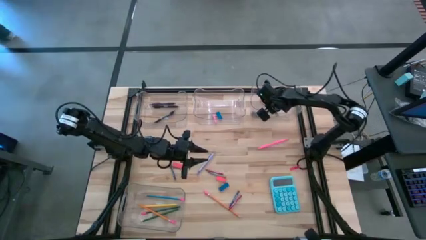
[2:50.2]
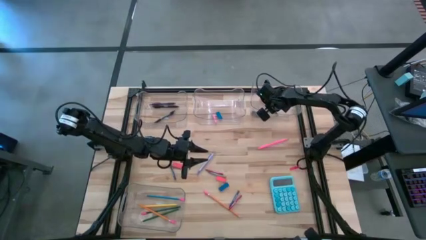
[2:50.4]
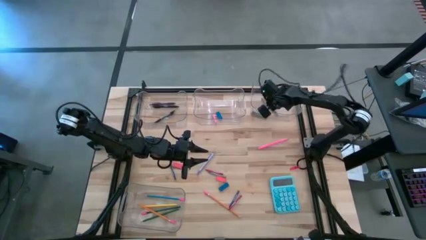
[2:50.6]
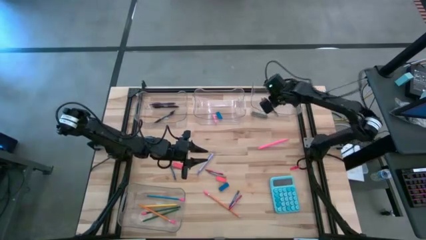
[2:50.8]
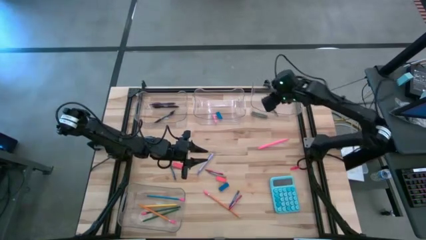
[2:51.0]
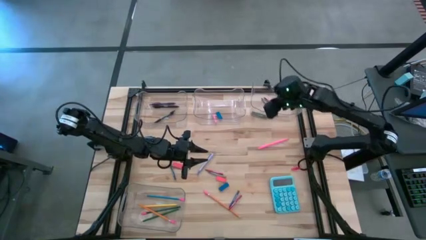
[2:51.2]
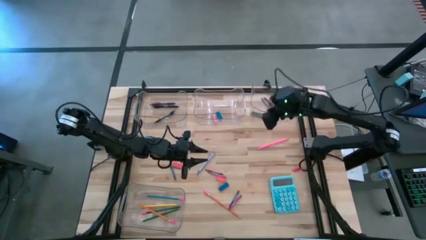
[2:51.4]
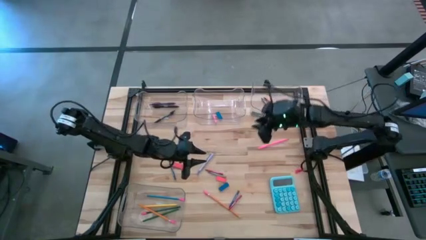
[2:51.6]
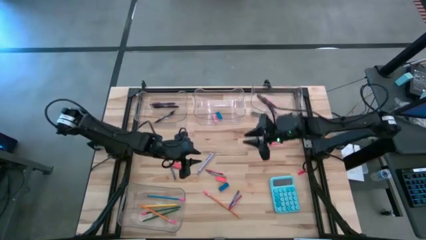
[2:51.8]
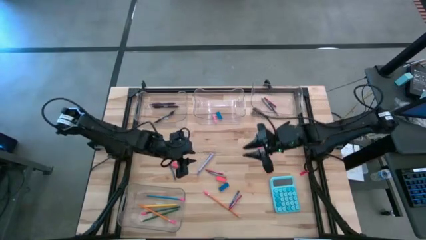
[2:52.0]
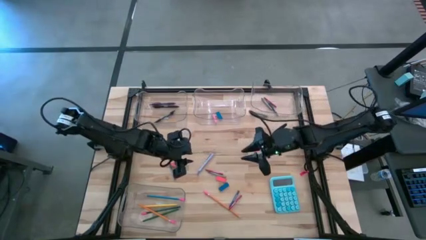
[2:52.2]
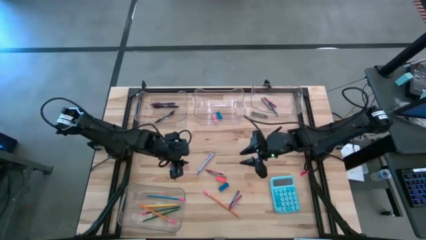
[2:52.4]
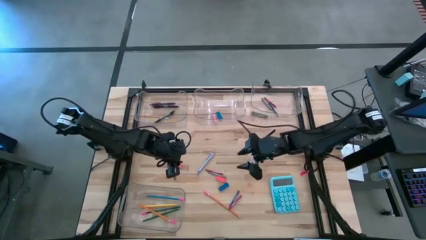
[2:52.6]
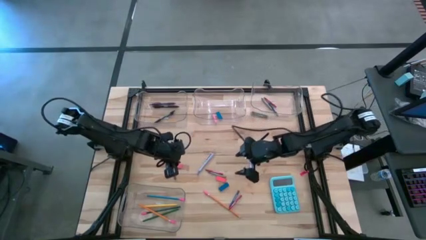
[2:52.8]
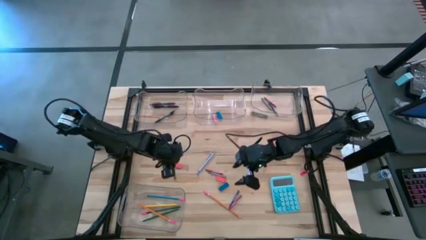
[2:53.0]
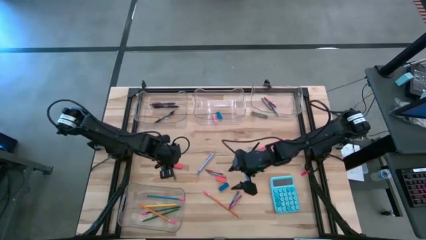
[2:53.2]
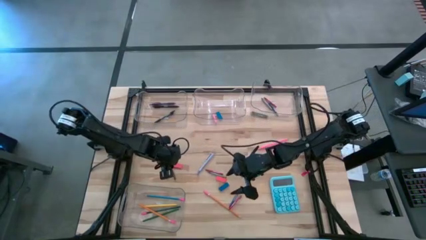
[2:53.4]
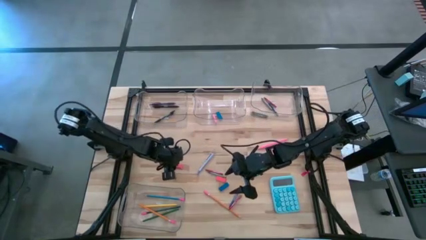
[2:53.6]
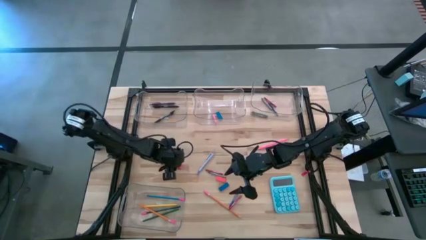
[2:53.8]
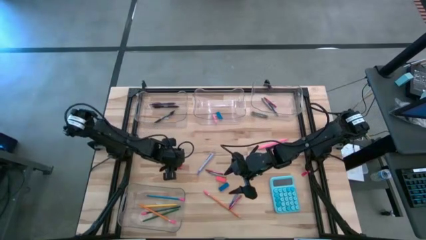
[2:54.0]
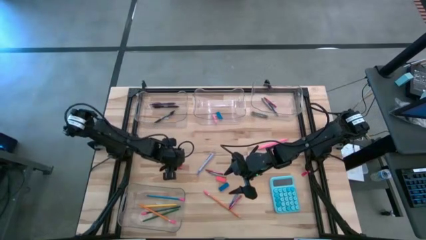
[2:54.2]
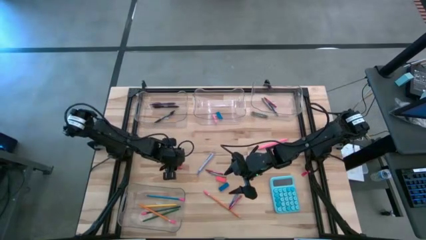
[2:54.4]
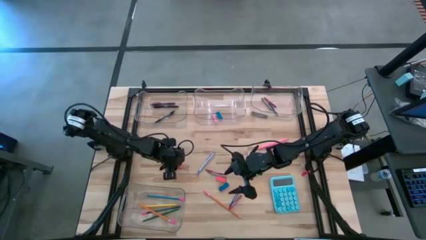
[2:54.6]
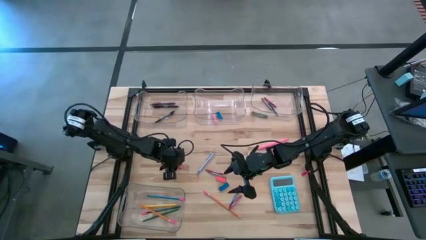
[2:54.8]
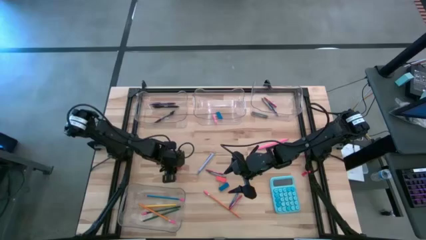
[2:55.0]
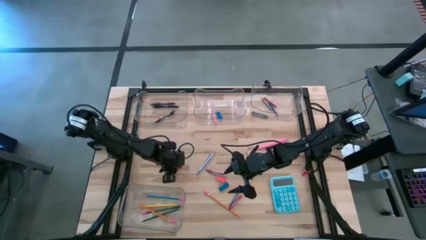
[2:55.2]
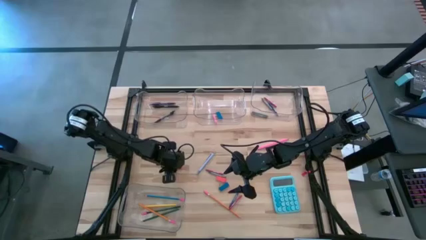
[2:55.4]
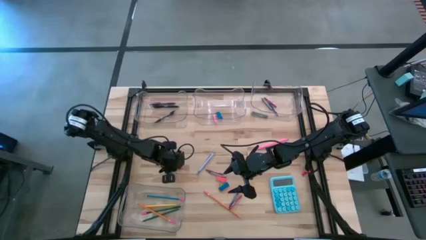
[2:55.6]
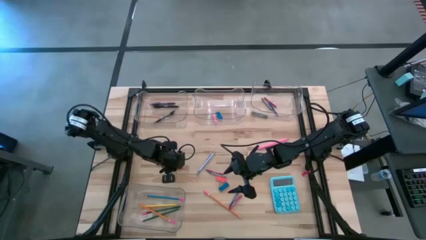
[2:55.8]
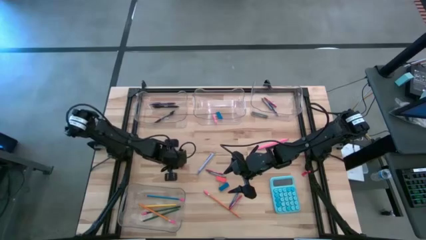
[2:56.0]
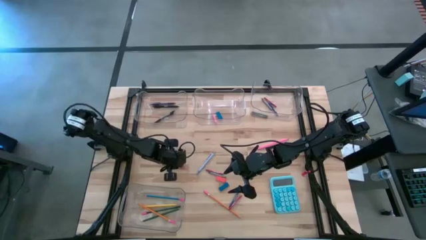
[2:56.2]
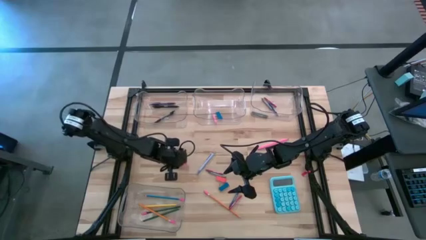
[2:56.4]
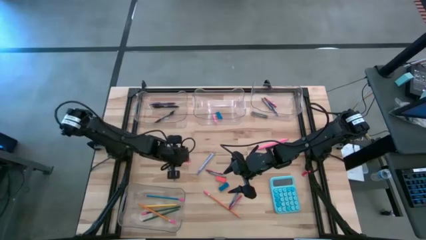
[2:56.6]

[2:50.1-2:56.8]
Task: Sort crayons/erasers/pens/pencils in bins
Put the orange eraser into the top middle transparent bin

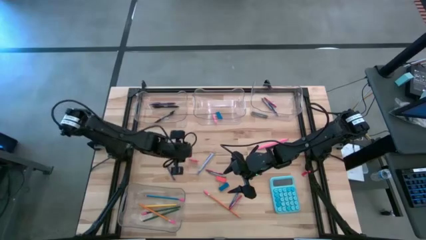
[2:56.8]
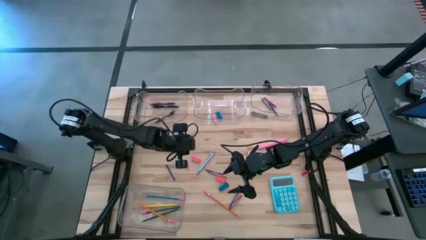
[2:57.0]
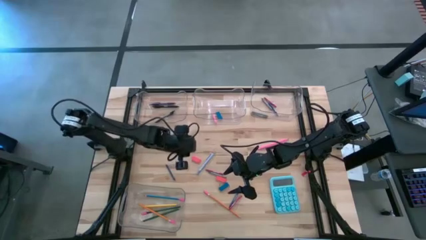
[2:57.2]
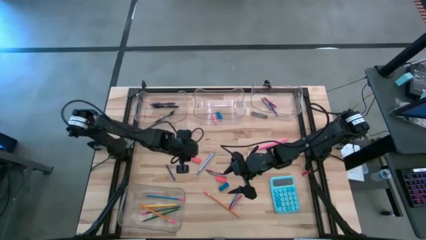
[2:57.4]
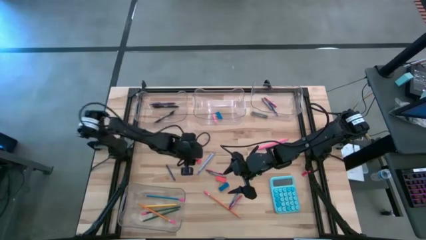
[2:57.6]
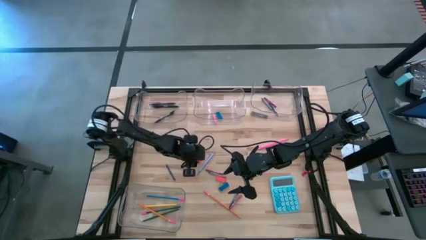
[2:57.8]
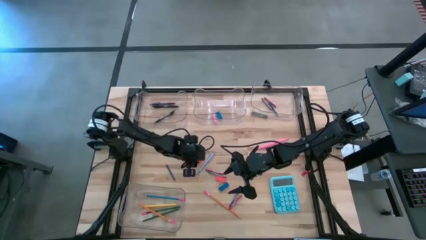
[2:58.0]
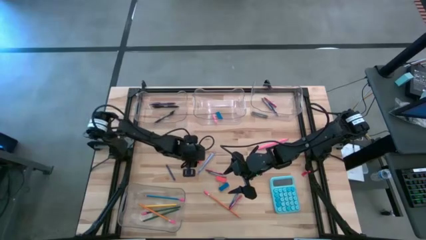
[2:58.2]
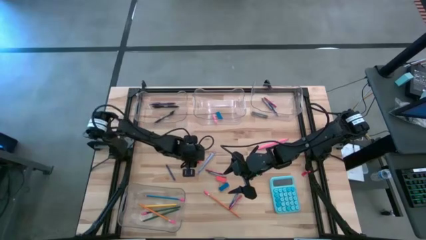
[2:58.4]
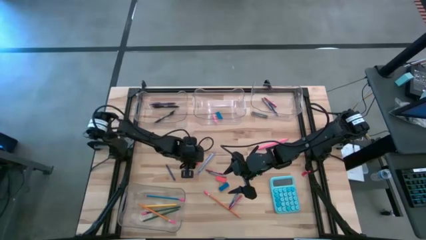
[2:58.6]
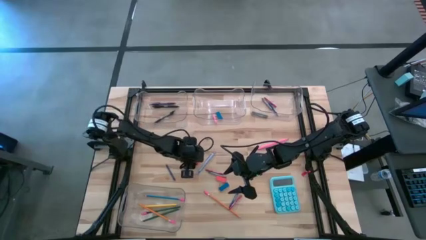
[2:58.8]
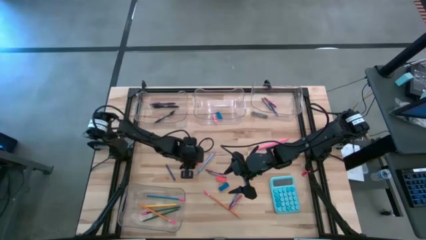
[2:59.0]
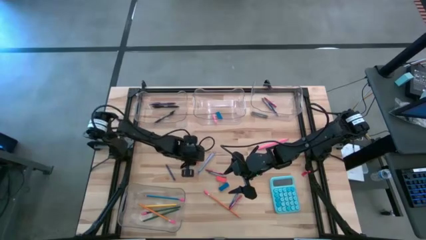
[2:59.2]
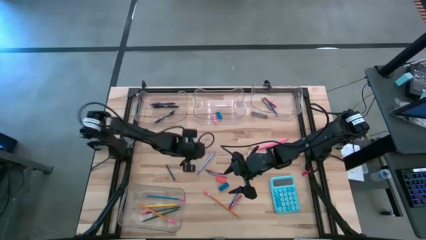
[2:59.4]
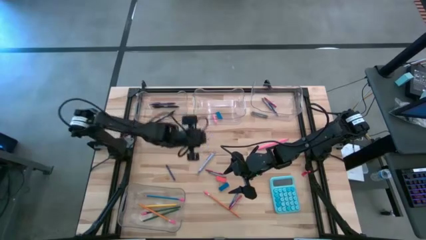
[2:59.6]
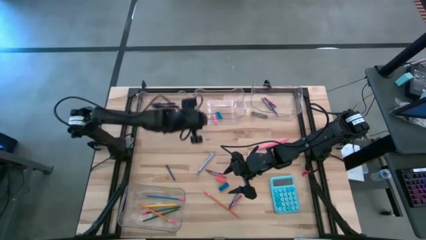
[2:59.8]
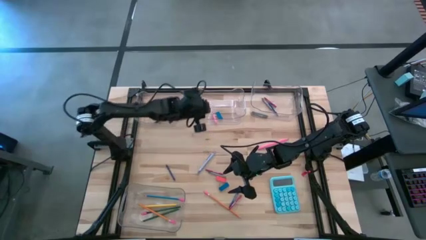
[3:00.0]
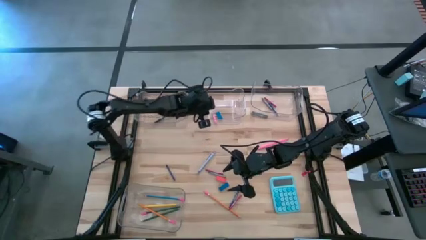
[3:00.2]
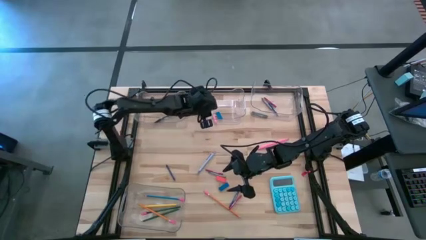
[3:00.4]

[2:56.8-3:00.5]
Put the orange eraser into the top middle transparent bin

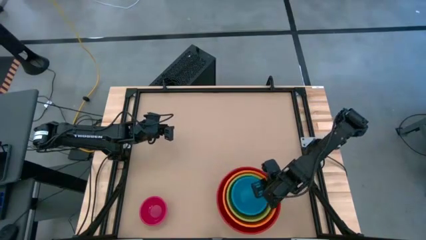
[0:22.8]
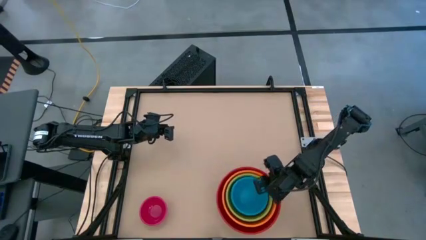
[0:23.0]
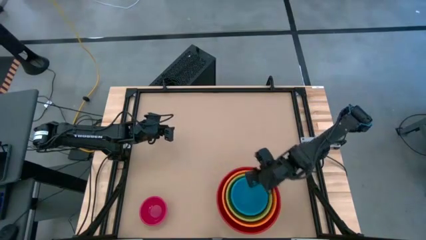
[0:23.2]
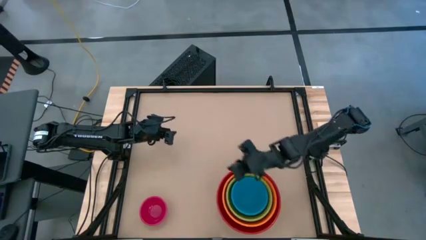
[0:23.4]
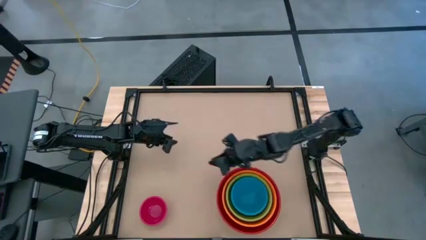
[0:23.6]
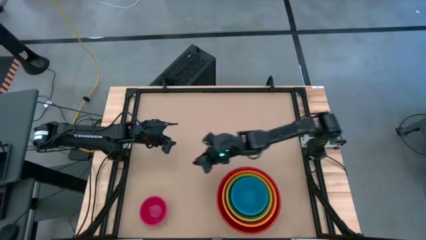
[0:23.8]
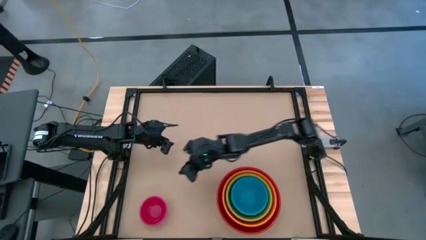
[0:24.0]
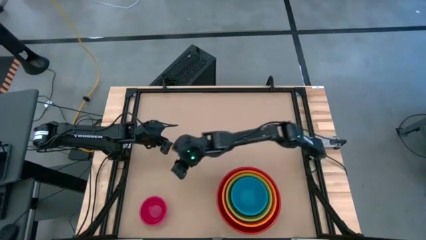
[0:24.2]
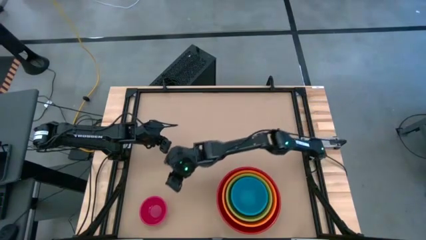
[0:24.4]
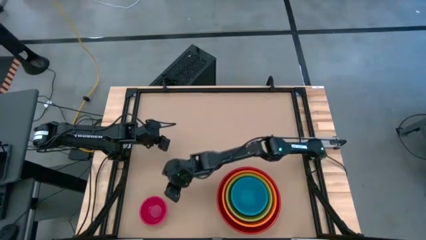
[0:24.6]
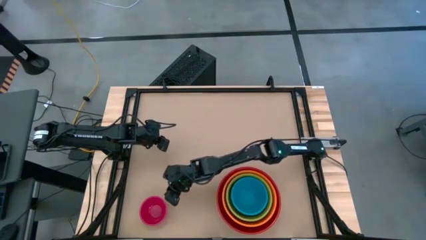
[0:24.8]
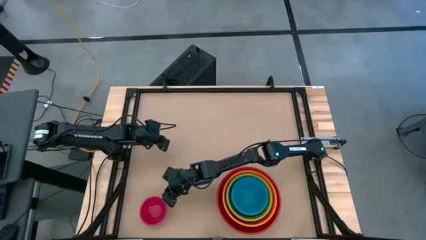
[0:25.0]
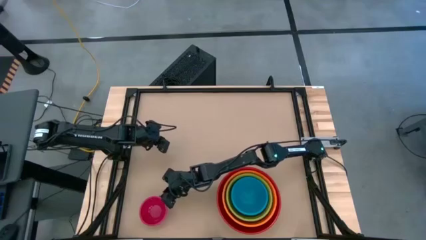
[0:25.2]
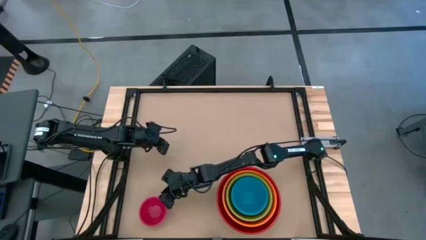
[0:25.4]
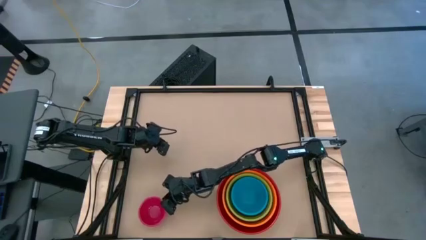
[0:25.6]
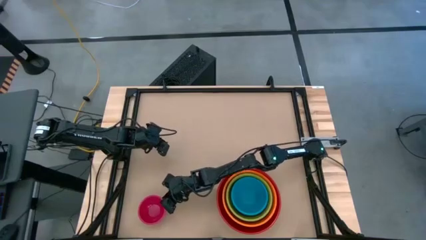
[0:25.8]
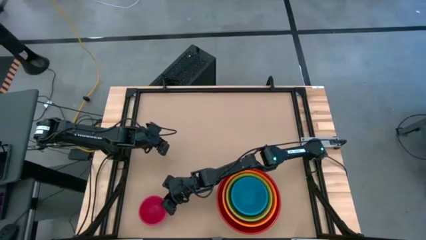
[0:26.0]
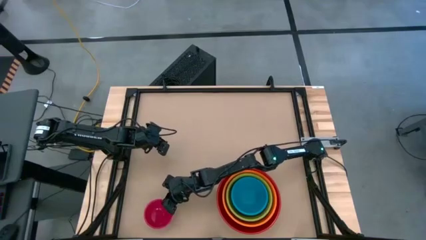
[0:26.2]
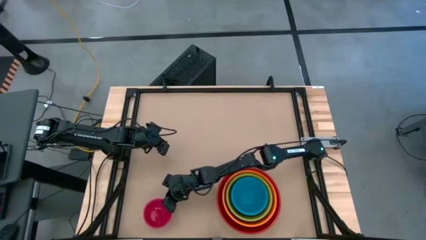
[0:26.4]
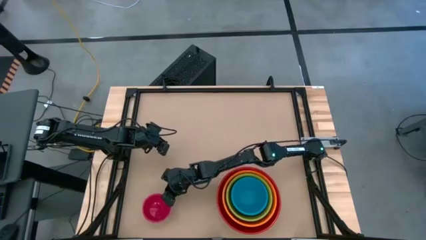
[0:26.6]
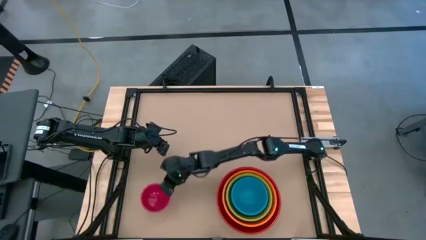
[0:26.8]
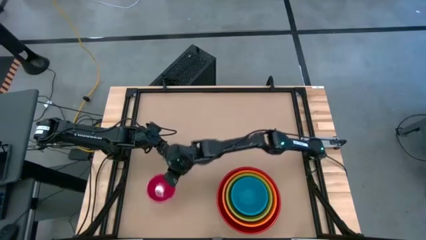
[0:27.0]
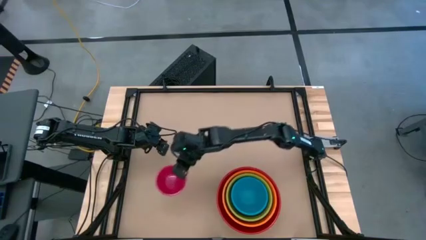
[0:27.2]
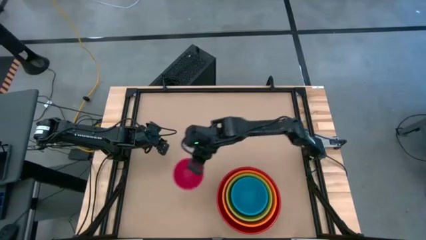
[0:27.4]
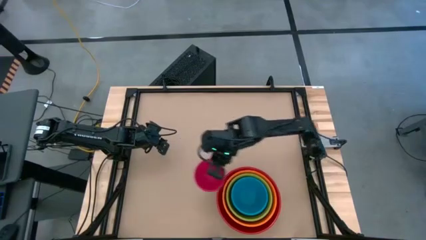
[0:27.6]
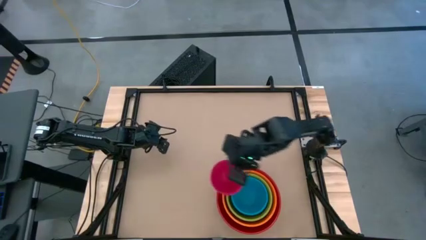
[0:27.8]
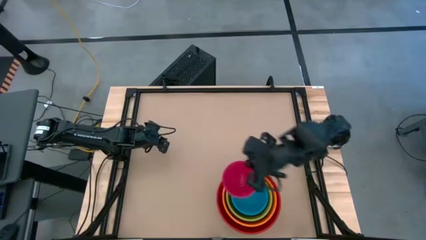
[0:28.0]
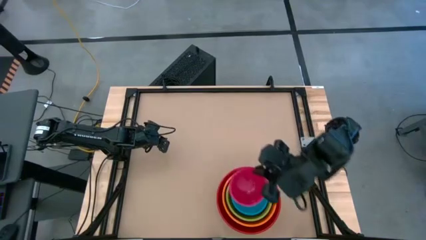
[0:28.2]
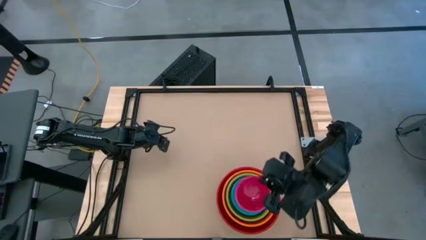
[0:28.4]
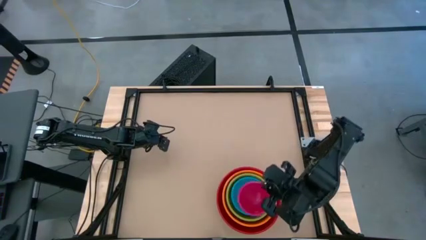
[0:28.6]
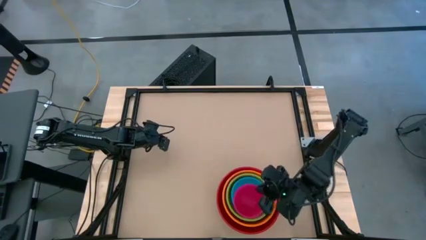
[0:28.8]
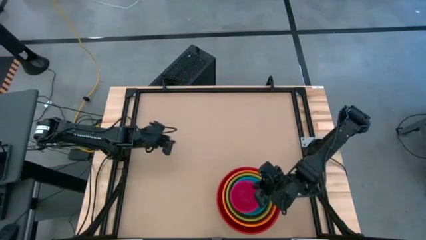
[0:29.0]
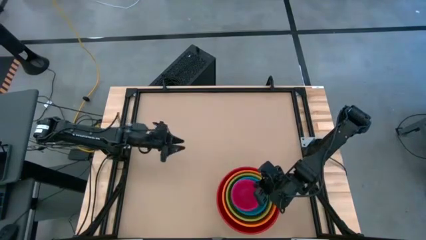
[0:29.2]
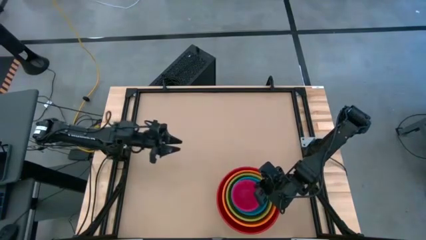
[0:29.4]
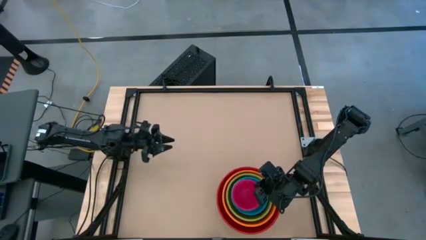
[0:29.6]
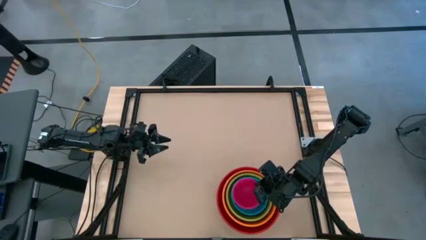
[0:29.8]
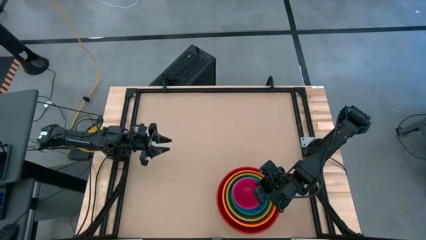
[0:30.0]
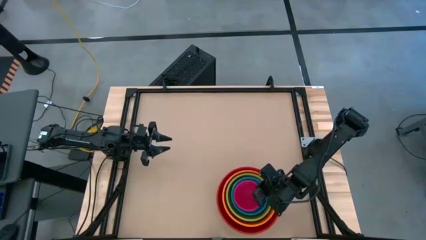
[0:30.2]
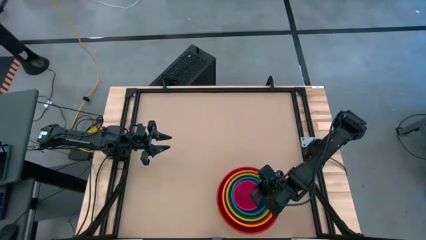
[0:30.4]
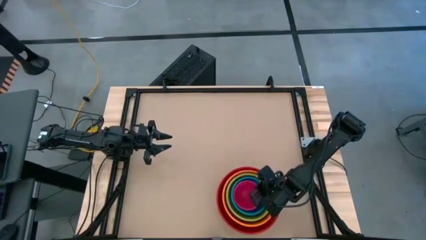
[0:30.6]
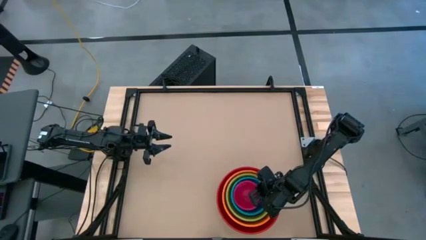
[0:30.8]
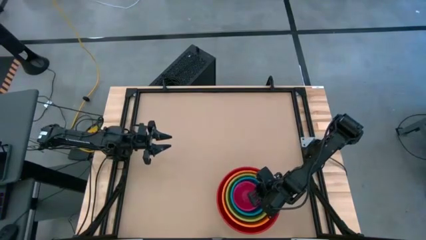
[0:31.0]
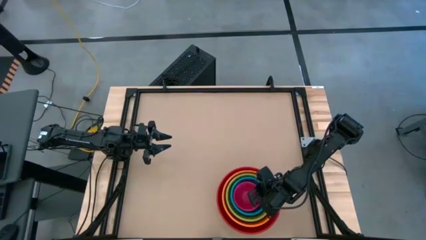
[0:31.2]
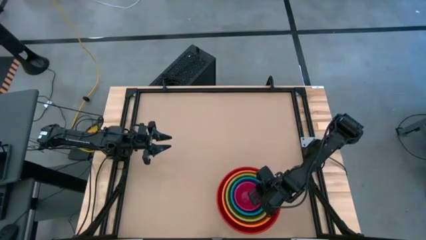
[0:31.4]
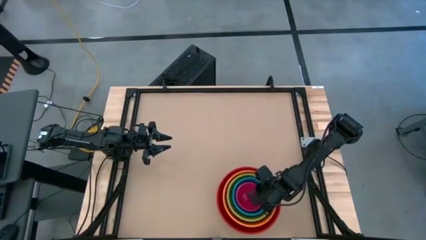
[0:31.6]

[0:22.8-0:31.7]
Task: Nest bowls inside each other by size order
Stack the pink bowl on the blue bowl
